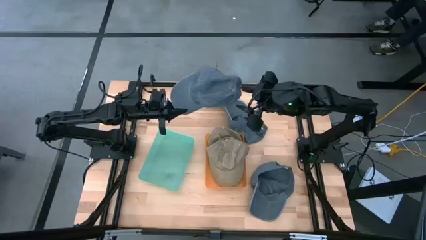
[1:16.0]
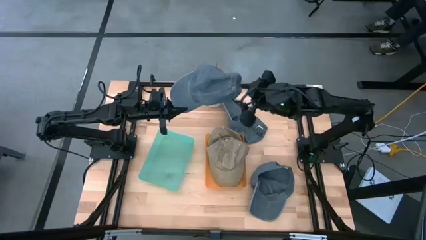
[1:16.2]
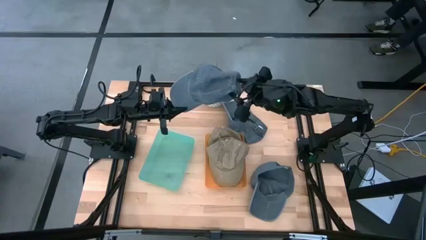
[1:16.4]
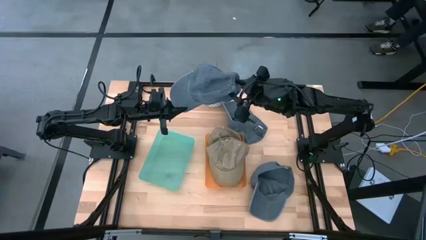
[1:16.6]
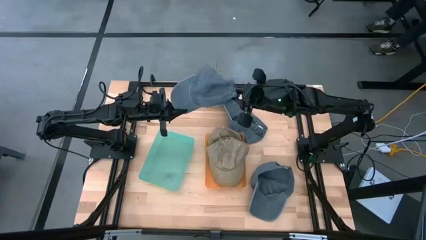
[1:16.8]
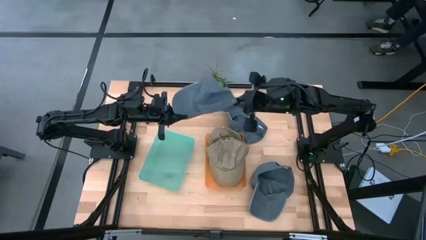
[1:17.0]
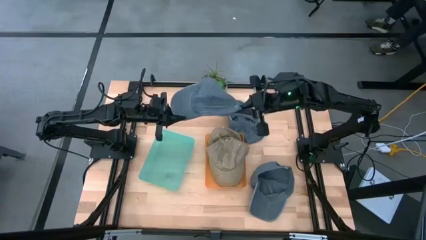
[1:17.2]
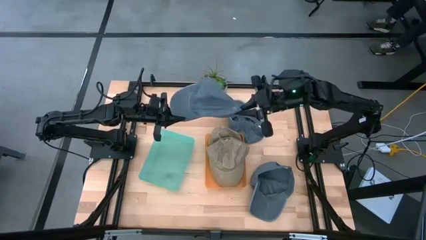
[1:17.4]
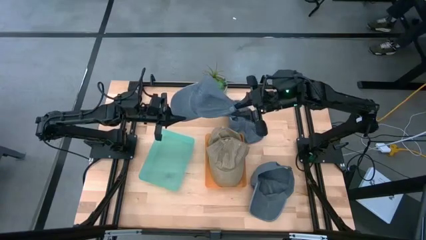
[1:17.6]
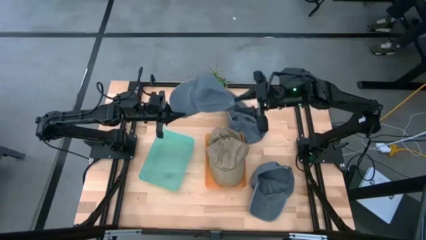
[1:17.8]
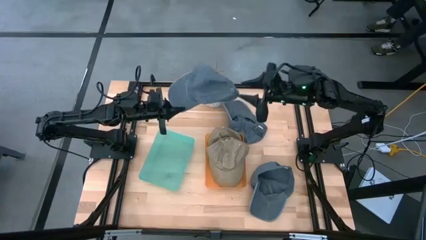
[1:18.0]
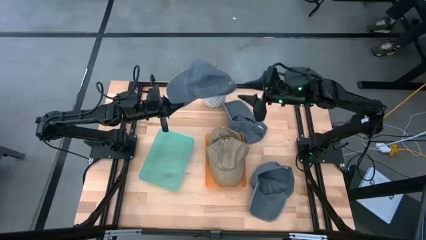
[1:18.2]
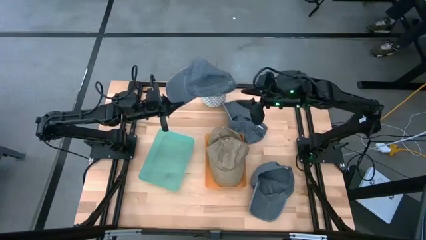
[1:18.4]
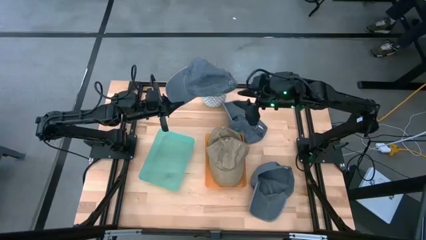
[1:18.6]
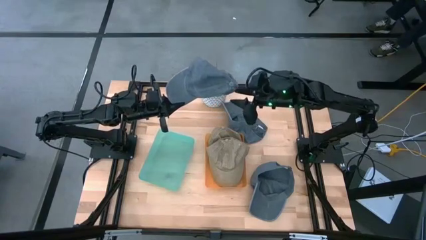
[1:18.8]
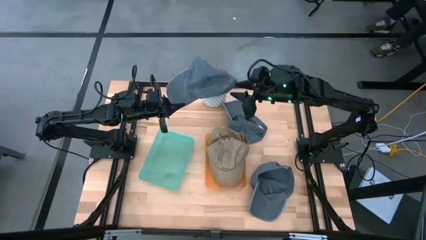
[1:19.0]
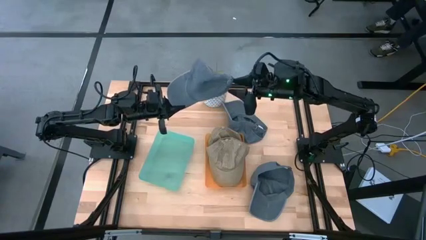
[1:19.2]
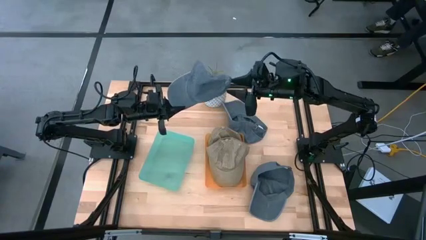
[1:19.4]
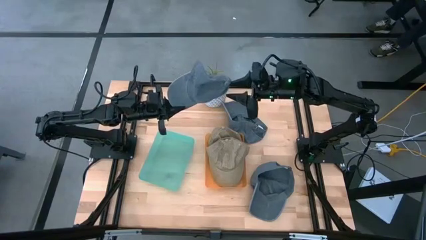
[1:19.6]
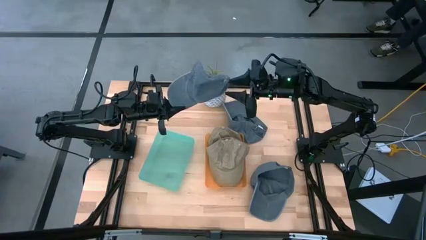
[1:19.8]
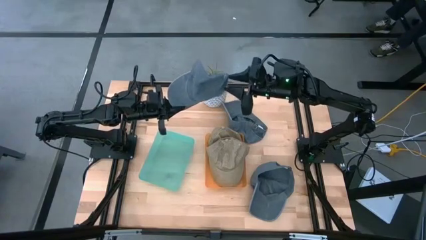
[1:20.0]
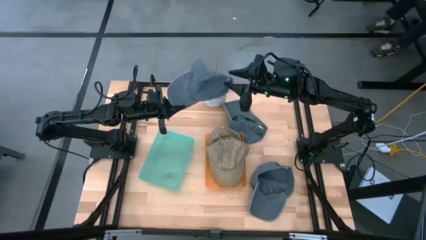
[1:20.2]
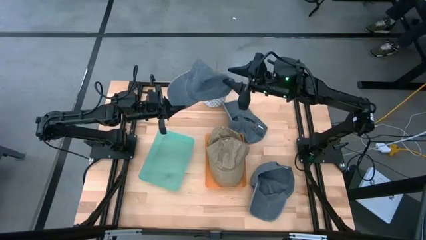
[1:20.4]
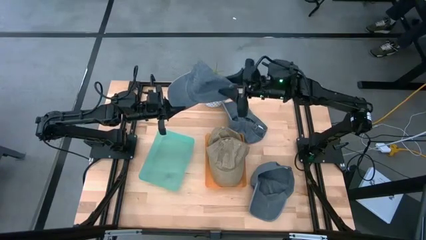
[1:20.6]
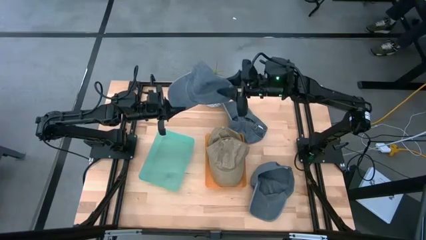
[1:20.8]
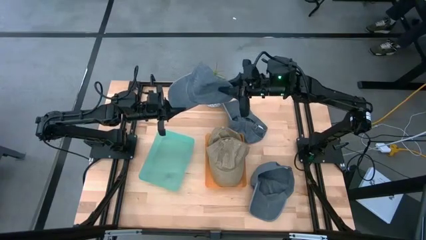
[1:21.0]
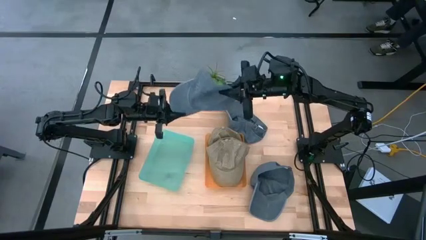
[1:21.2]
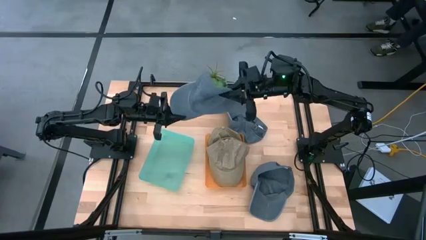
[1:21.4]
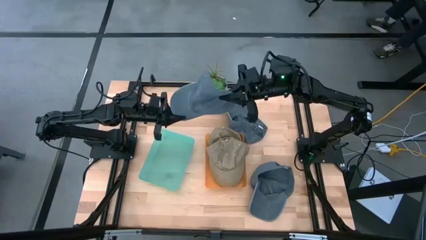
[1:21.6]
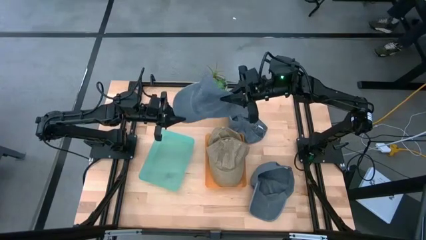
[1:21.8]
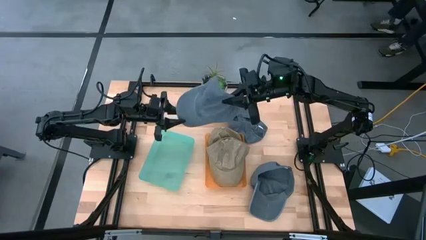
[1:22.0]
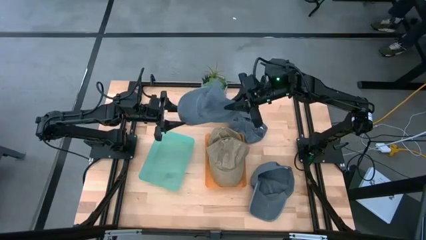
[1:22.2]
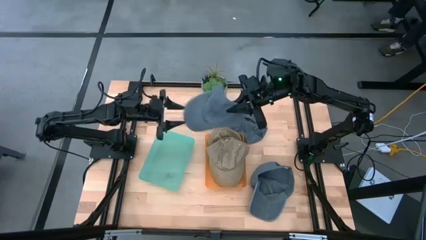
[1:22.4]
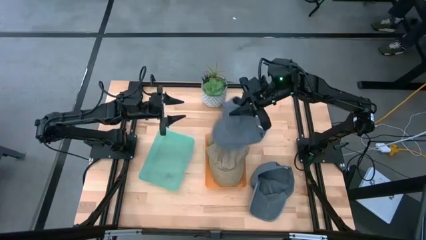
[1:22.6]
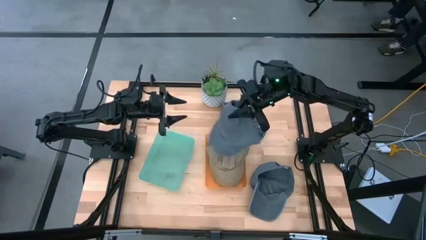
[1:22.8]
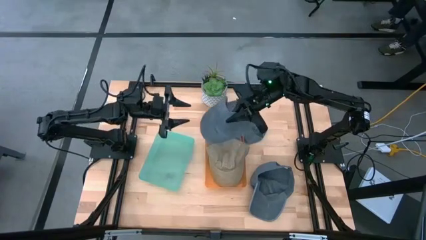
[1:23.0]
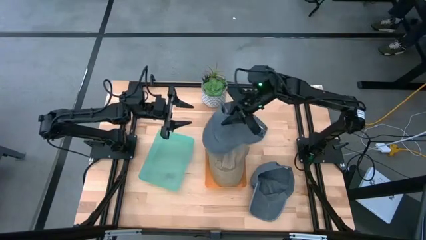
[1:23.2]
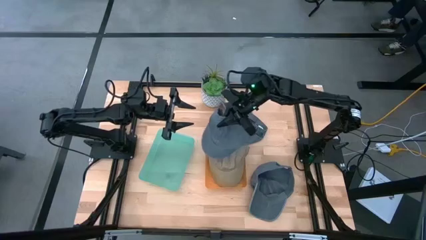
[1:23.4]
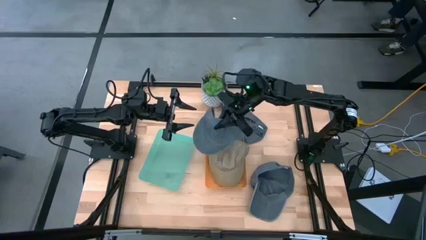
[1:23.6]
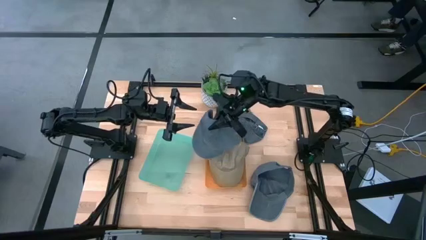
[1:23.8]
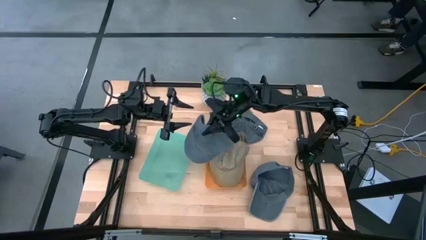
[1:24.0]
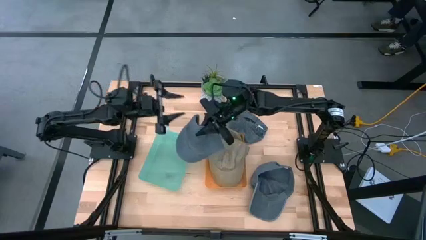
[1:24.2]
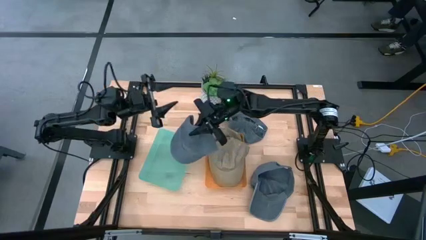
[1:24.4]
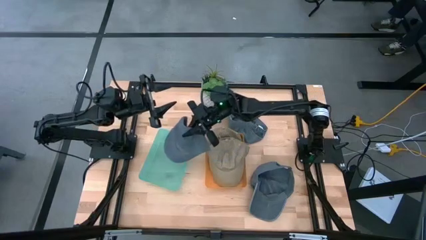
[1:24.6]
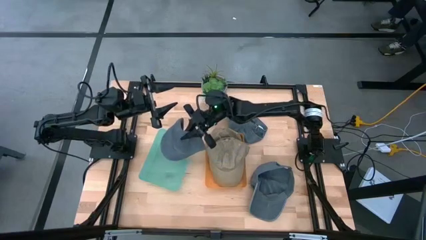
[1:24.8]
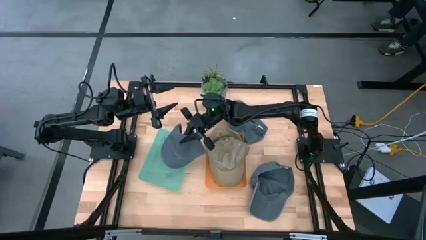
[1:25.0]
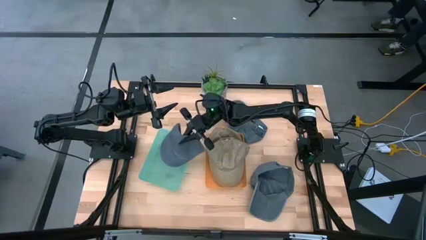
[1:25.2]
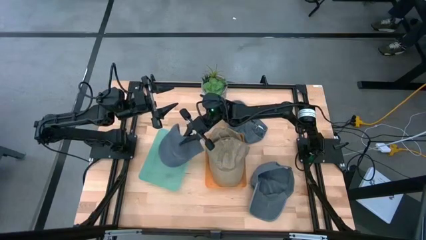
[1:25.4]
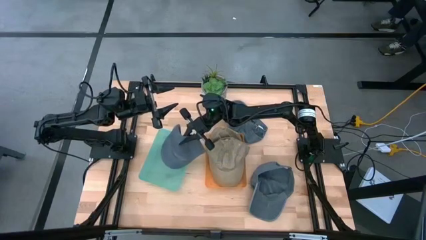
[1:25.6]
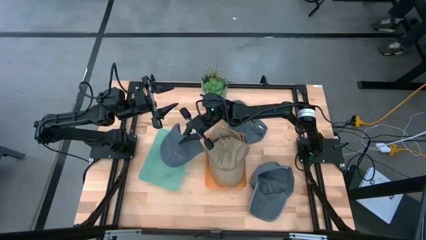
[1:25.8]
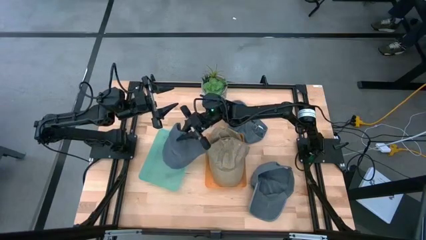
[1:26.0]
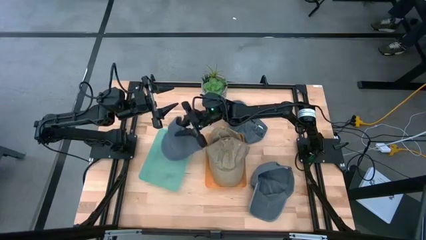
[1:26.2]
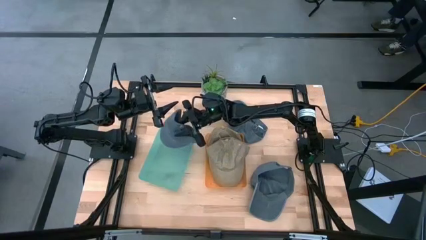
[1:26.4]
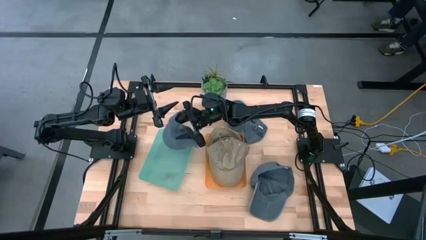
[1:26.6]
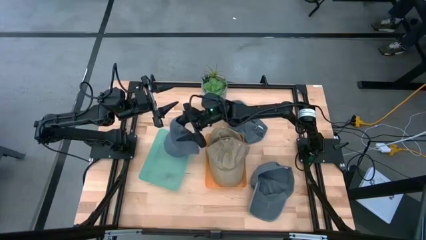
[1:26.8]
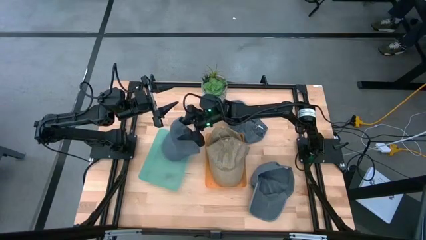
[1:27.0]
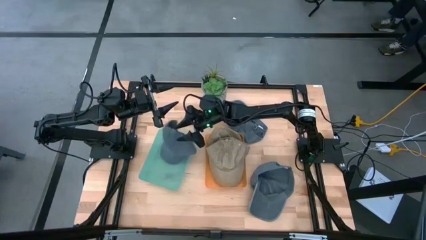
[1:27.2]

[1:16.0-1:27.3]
Task: Pick & Place hat
Put the top right blue cap into the green bin
